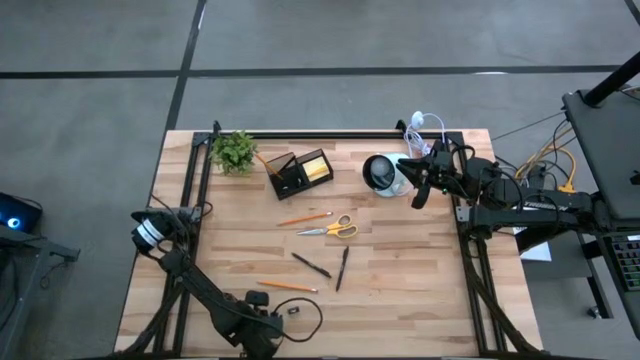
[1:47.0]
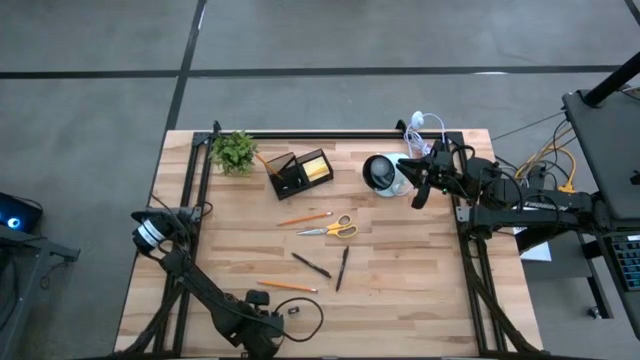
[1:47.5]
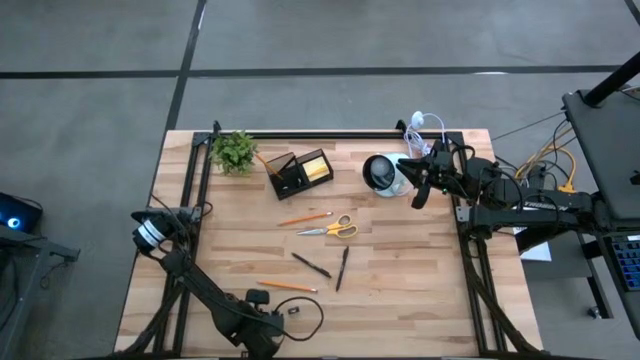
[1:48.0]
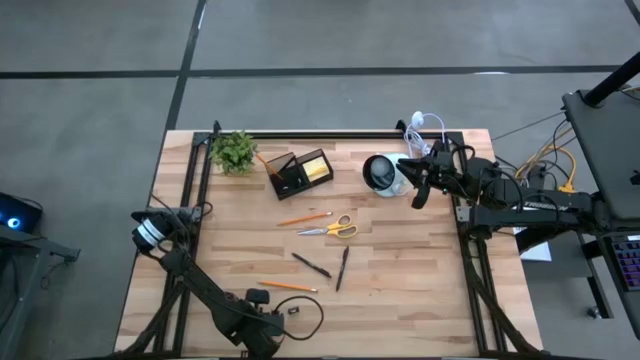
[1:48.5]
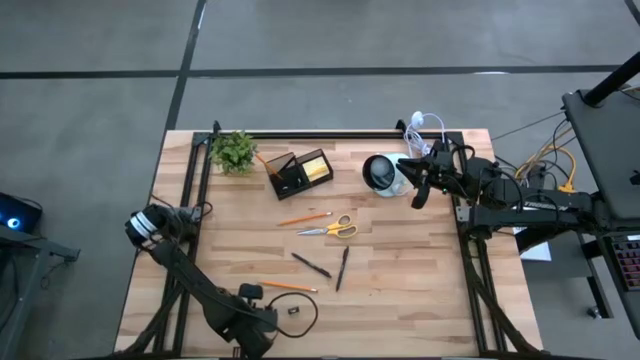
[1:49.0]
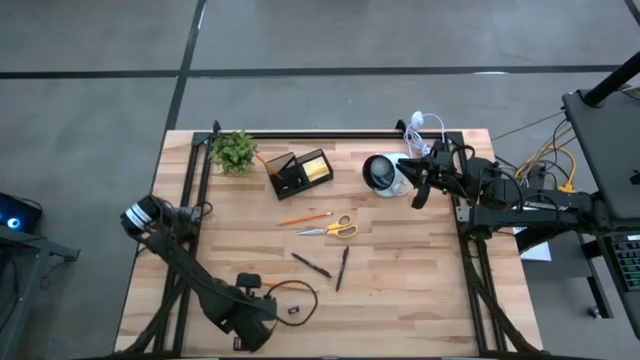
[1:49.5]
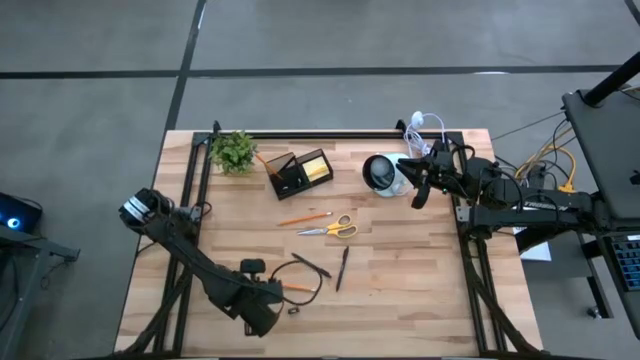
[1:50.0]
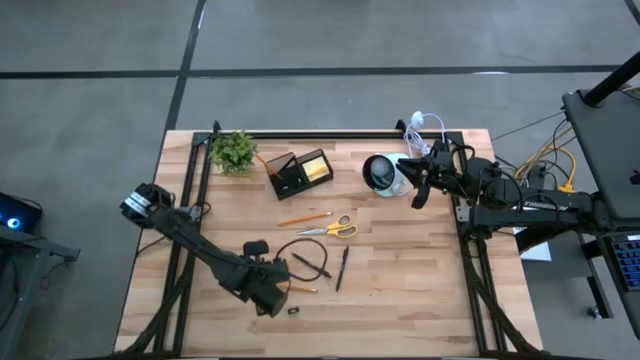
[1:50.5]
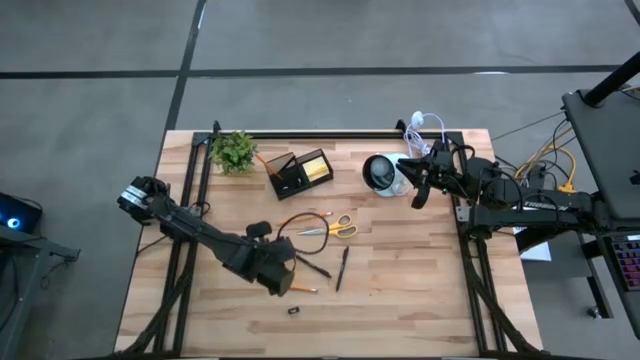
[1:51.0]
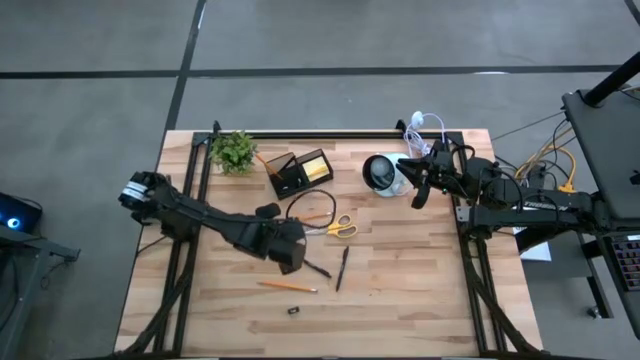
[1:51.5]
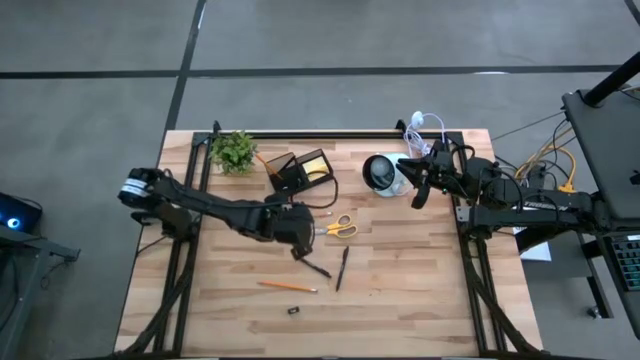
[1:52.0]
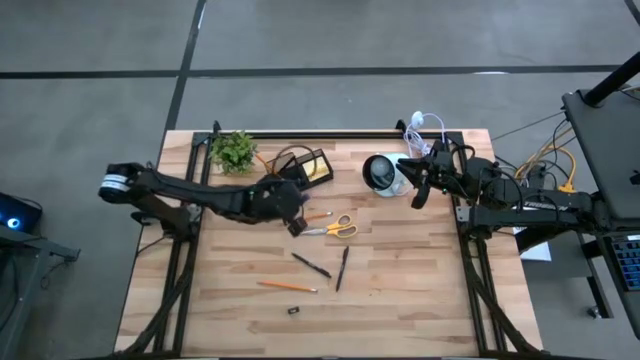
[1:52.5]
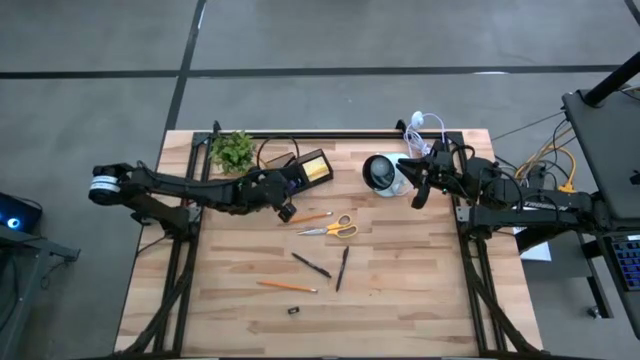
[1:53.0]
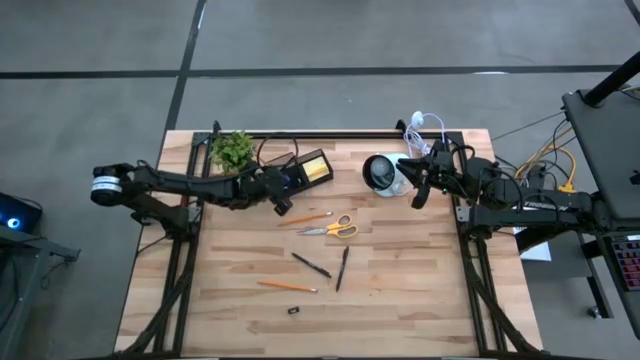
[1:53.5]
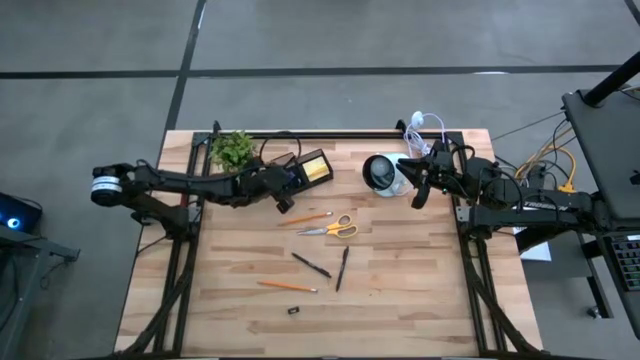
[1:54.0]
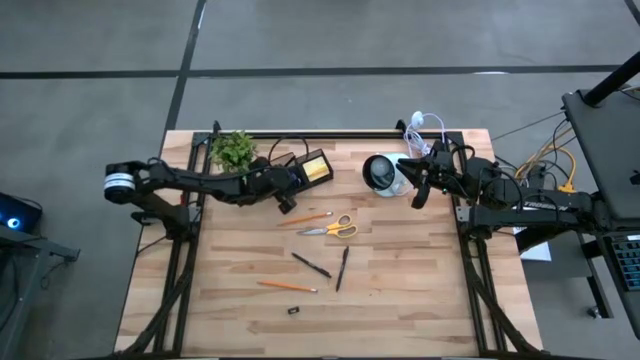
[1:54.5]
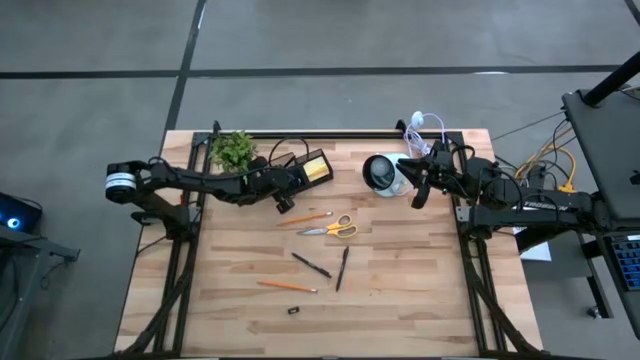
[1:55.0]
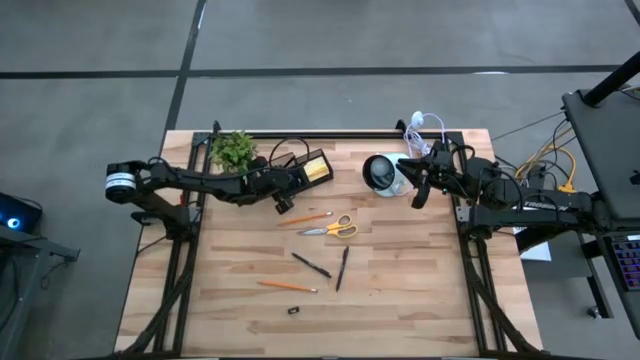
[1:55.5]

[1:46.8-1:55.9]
Task: Pick and place office supplies into organizer
Put the blue eraser into the black desk organizer

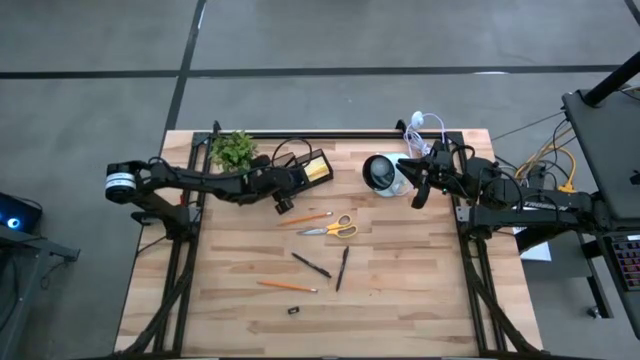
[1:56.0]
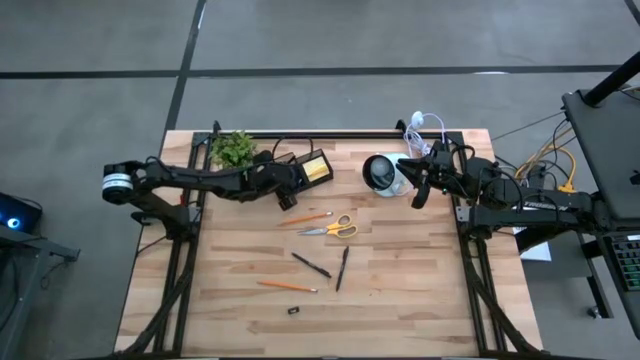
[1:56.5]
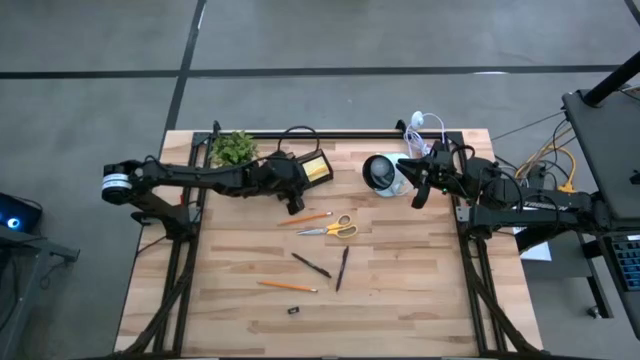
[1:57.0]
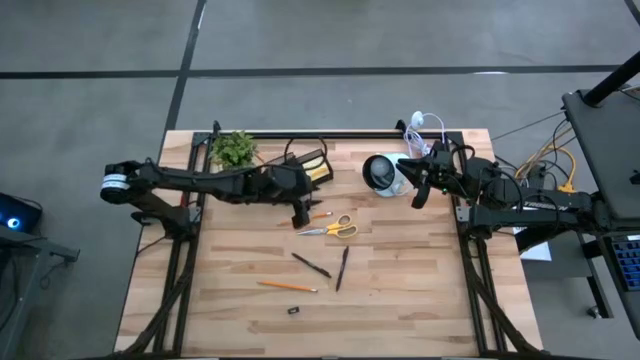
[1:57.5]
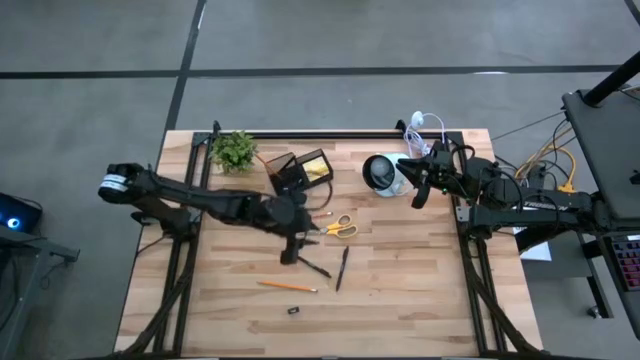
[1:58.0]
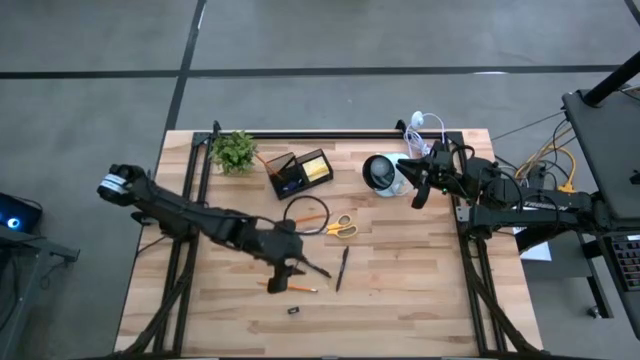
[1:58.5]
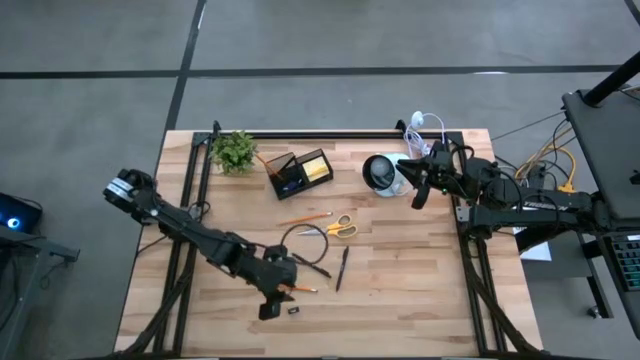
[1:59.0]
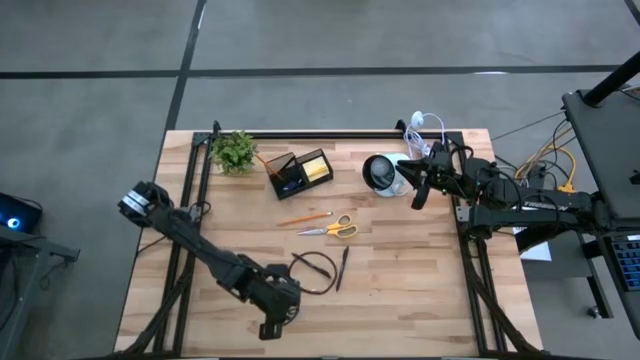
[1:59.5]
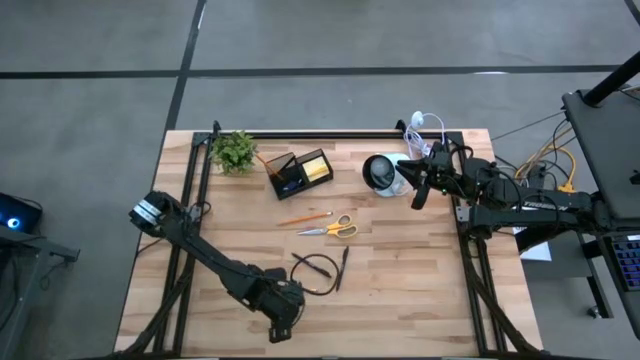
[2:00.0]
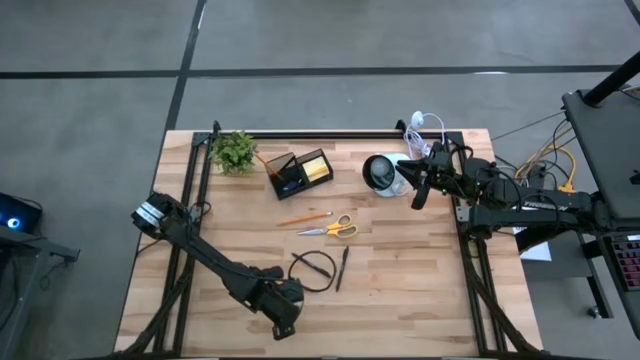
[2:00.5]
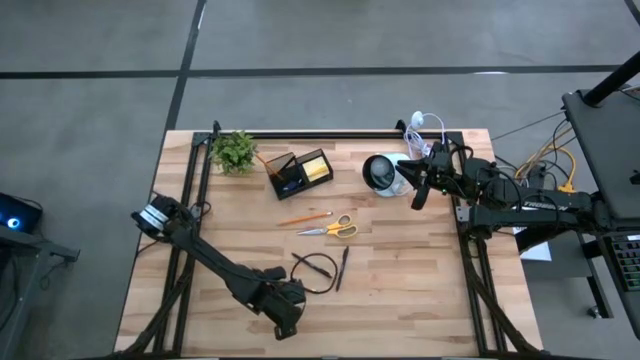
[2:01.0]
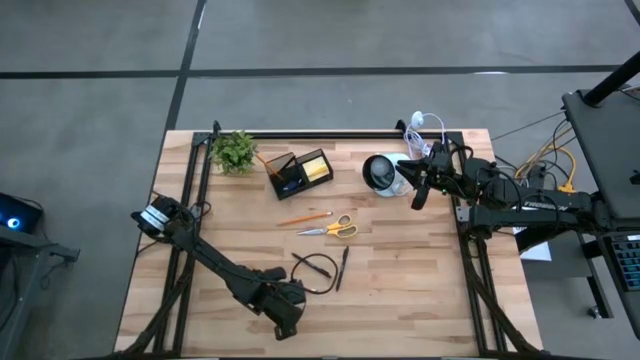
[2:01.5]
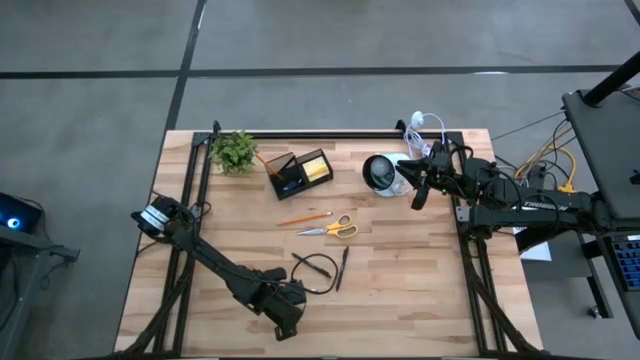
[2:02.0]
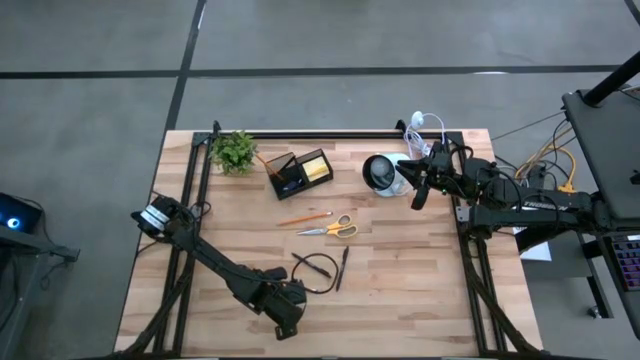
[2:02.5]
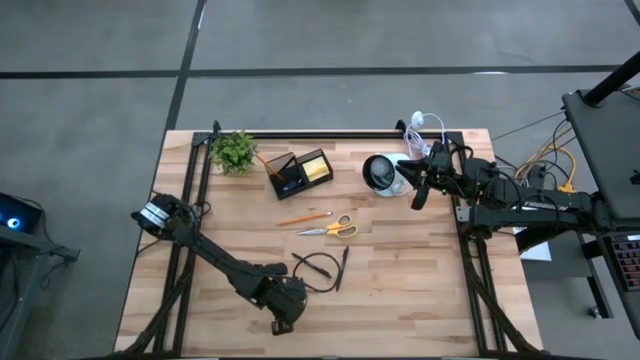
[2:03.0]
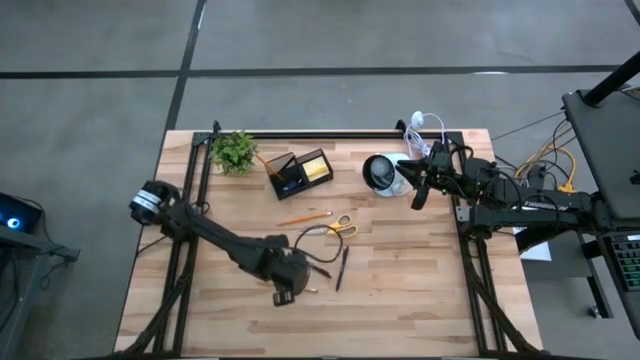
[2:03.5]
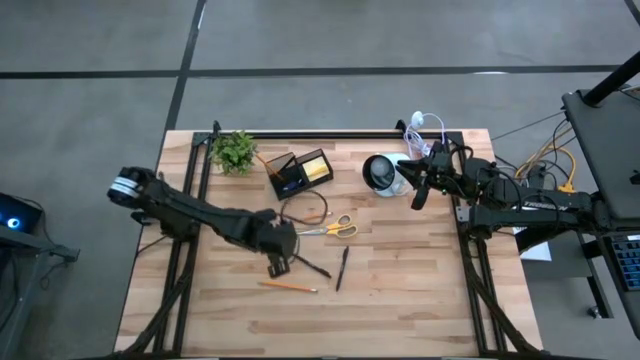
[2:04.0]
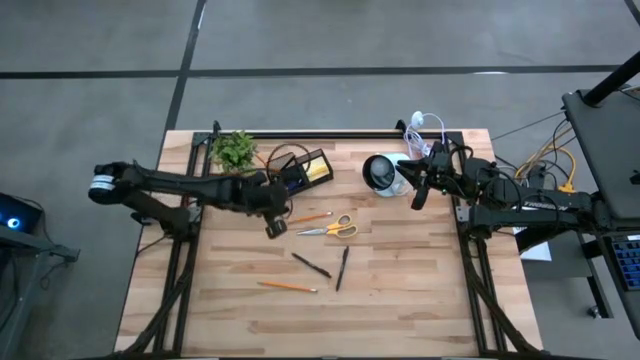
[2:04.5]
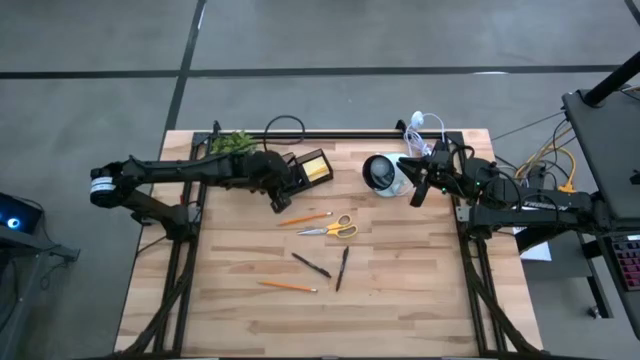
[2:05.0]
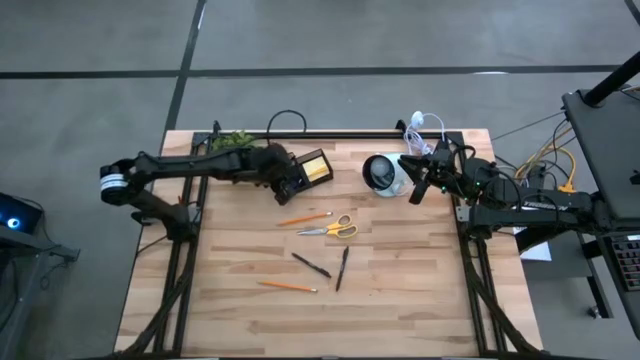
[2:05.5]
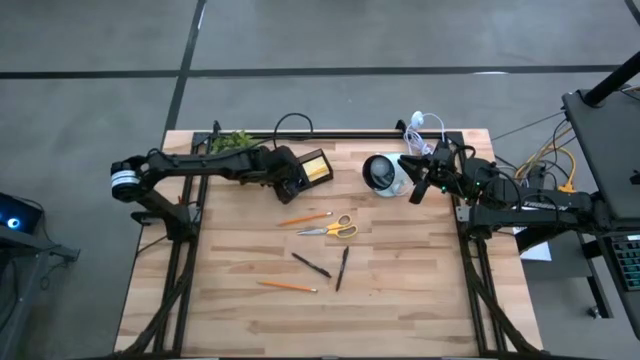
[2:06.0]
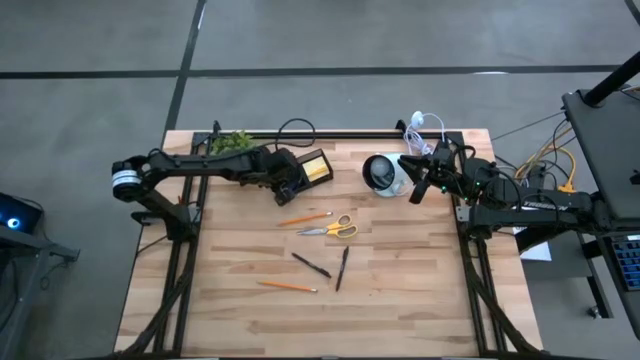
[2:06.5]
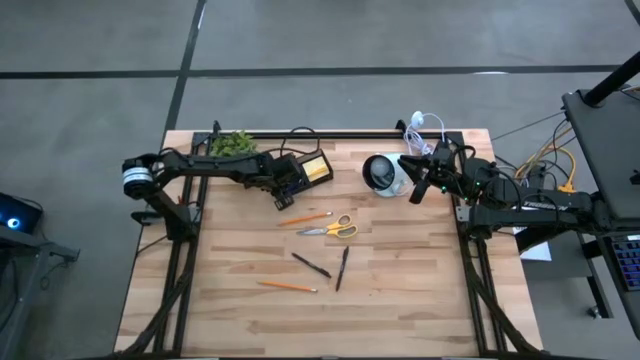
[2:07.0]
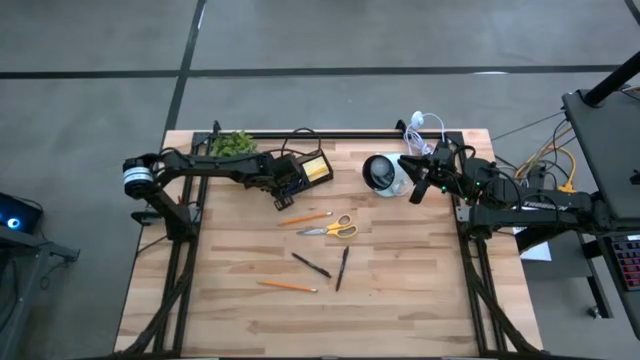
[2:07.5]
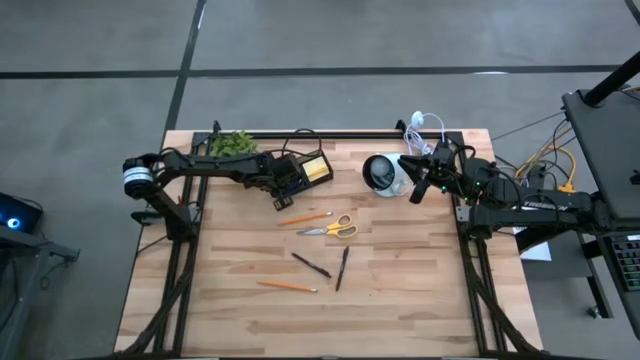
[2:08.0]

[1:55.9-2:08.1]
Put the black binder clip into the black desk organizer

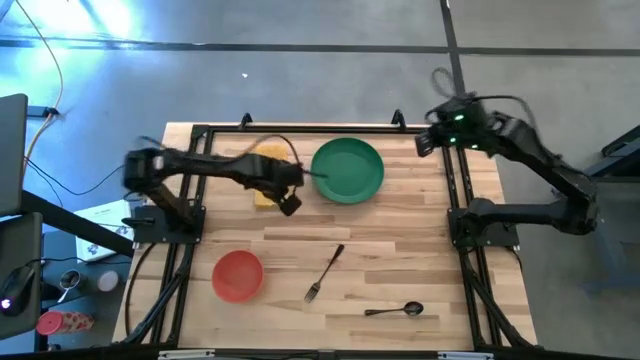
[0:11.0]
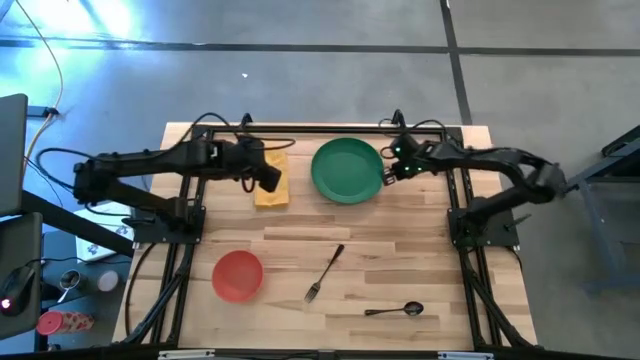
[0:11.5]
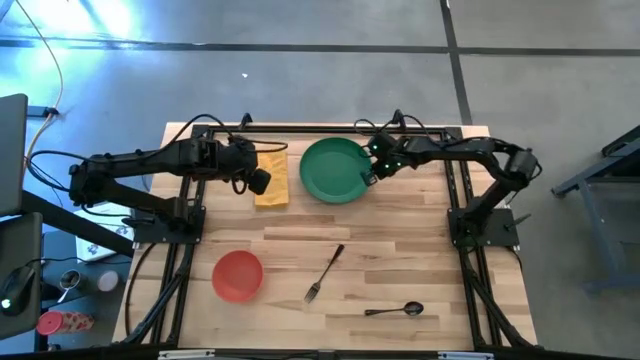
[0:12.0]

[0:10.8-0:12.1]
Task: Set table place
Adjust the green plate on the table
